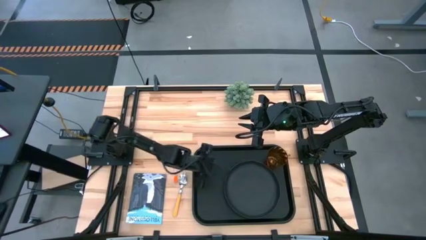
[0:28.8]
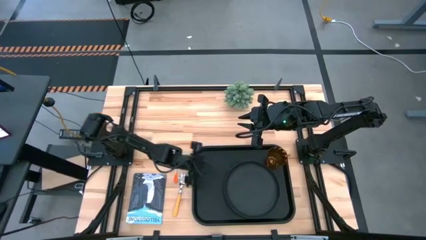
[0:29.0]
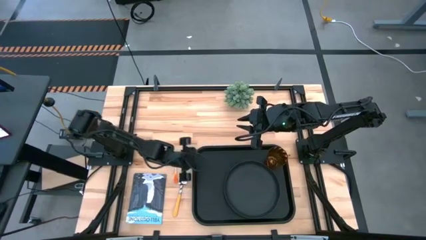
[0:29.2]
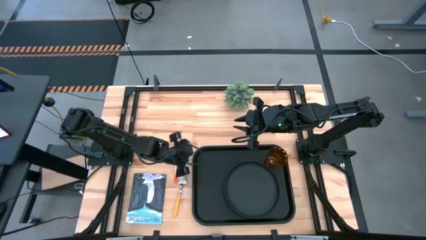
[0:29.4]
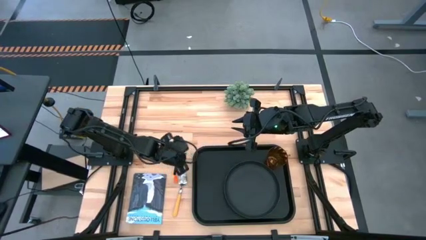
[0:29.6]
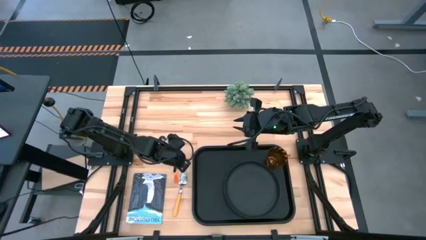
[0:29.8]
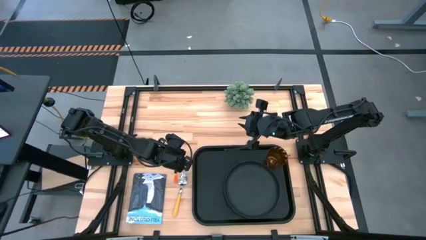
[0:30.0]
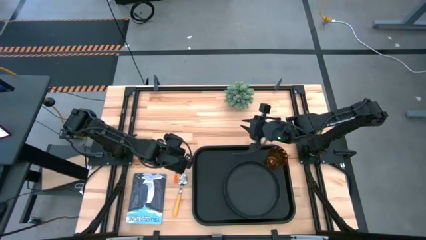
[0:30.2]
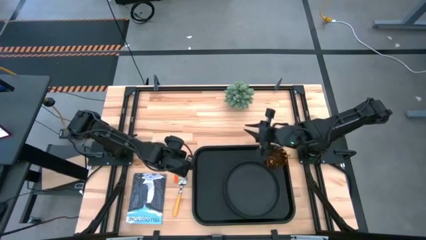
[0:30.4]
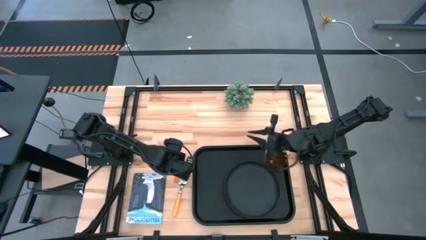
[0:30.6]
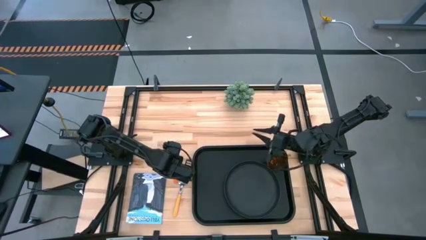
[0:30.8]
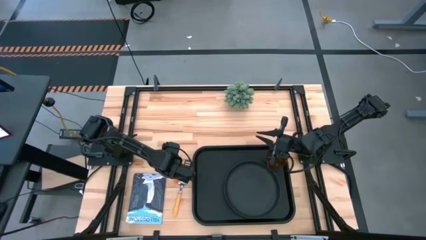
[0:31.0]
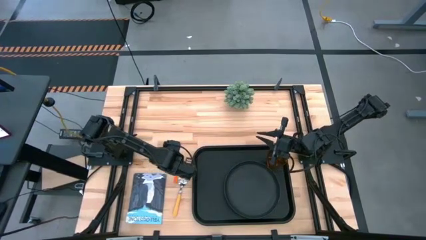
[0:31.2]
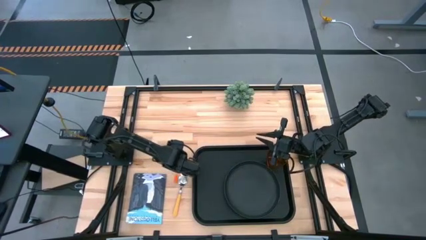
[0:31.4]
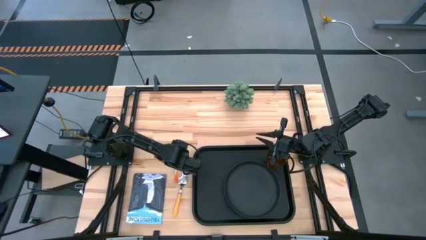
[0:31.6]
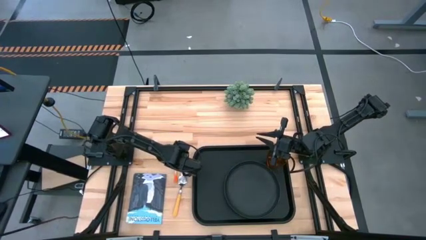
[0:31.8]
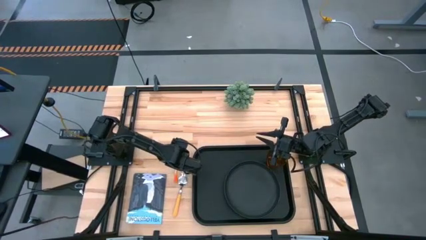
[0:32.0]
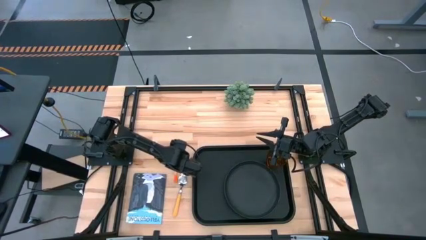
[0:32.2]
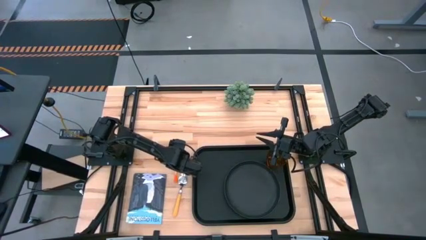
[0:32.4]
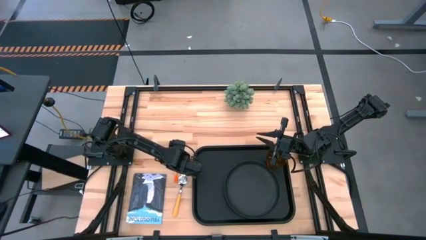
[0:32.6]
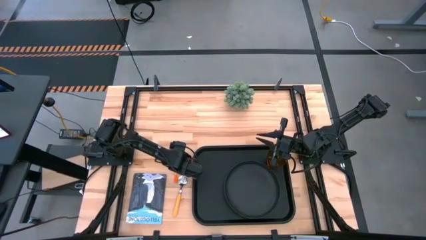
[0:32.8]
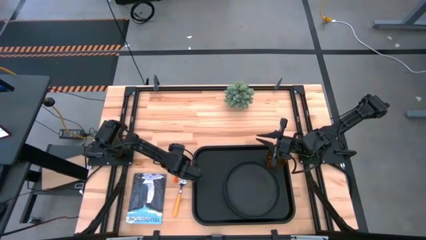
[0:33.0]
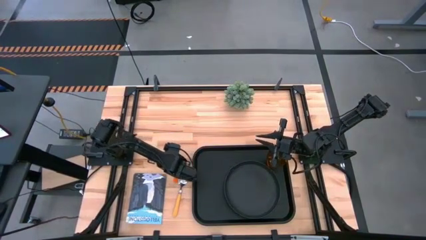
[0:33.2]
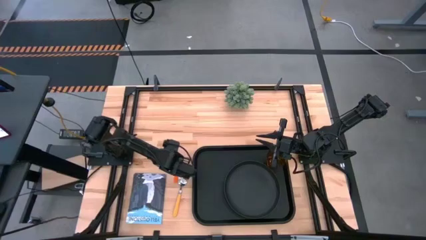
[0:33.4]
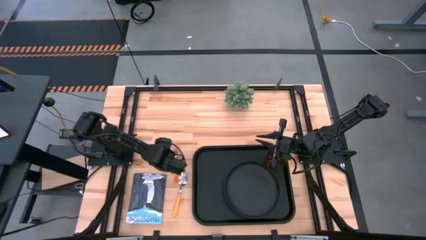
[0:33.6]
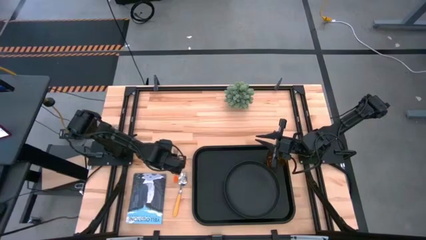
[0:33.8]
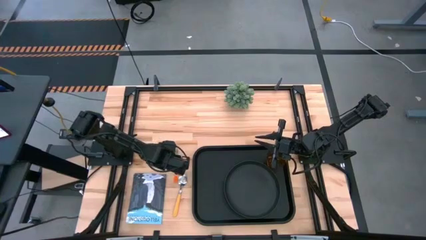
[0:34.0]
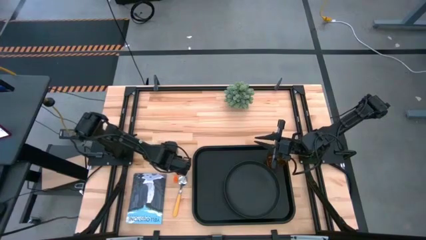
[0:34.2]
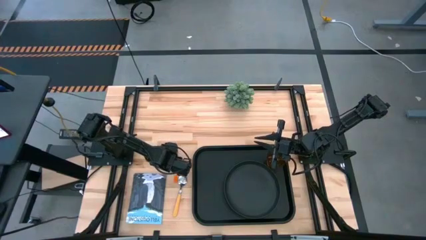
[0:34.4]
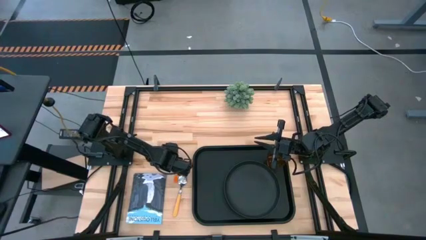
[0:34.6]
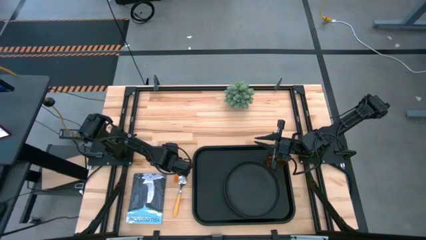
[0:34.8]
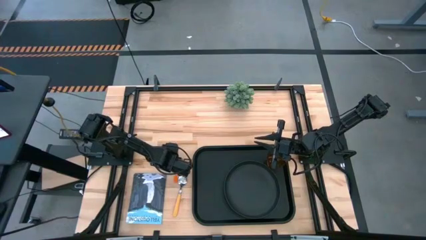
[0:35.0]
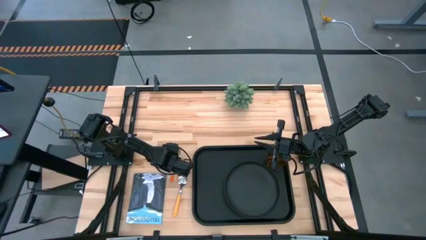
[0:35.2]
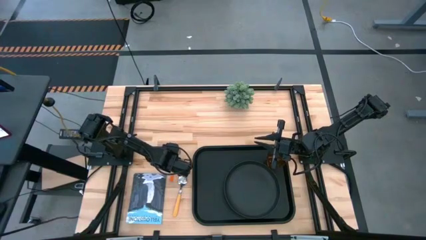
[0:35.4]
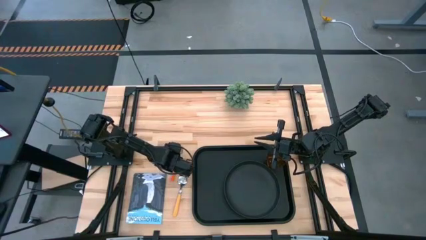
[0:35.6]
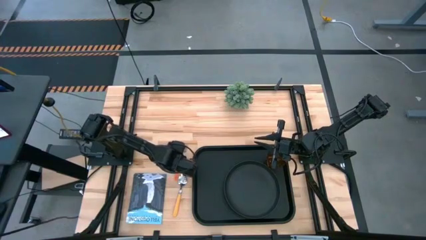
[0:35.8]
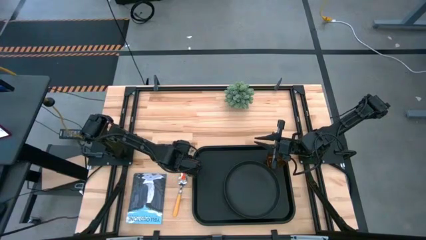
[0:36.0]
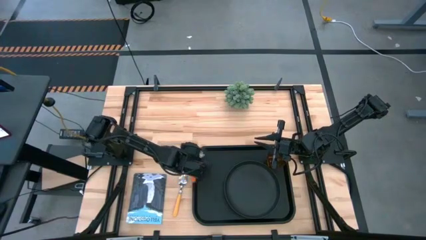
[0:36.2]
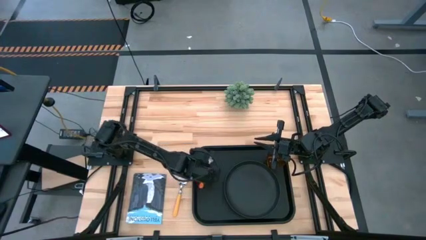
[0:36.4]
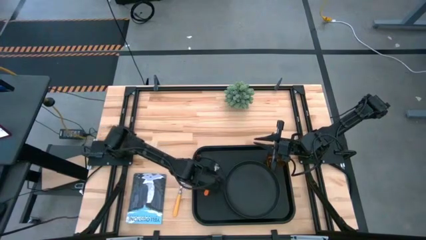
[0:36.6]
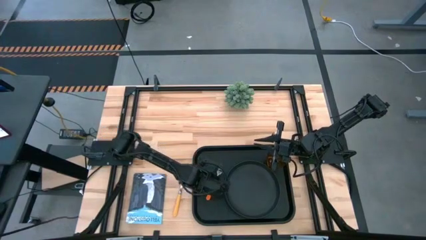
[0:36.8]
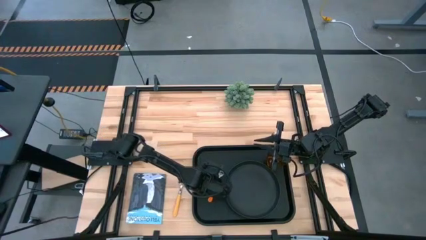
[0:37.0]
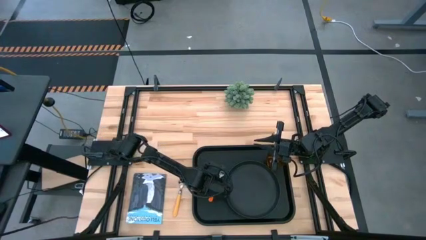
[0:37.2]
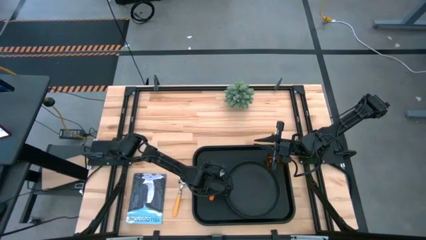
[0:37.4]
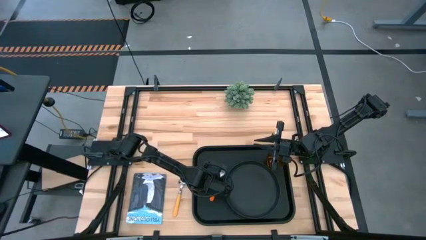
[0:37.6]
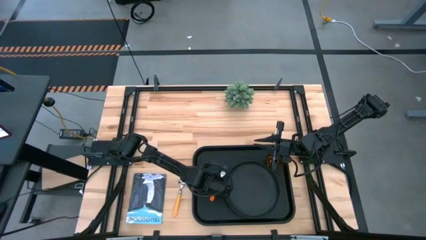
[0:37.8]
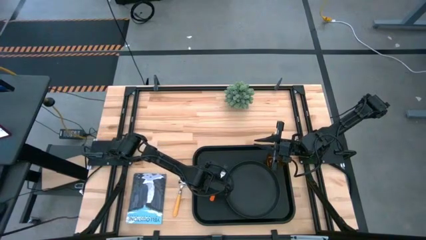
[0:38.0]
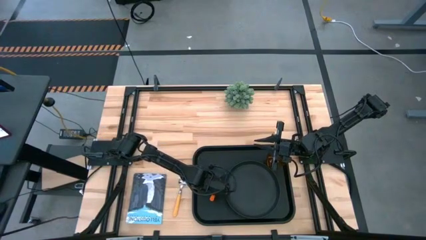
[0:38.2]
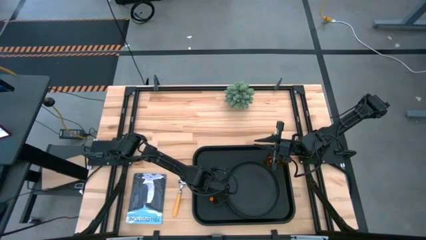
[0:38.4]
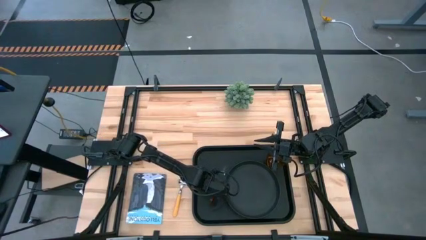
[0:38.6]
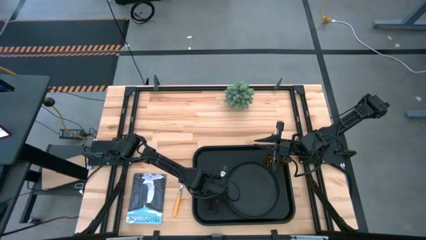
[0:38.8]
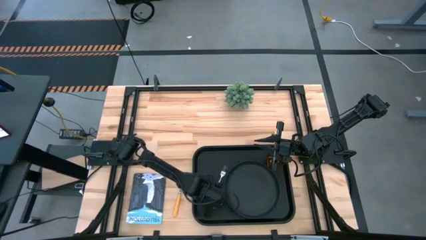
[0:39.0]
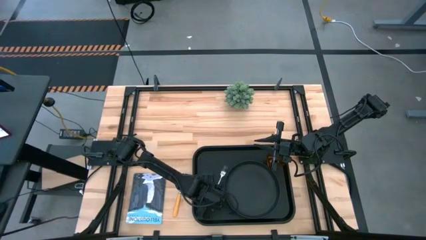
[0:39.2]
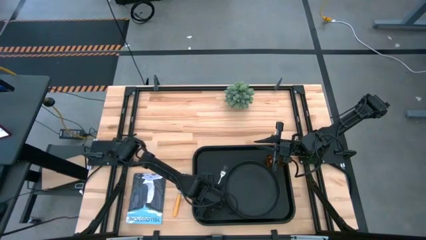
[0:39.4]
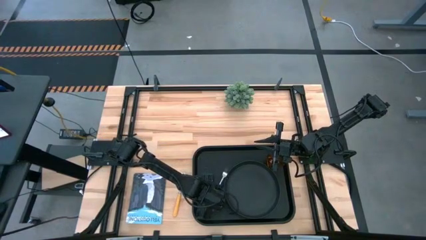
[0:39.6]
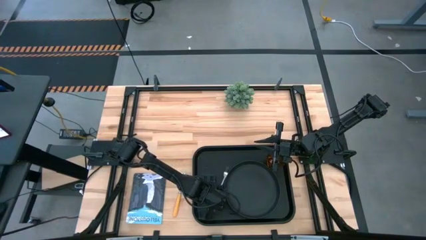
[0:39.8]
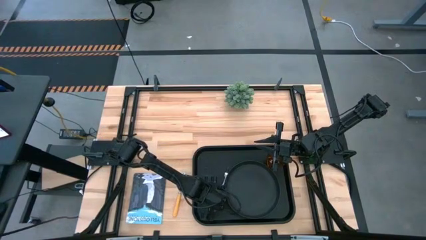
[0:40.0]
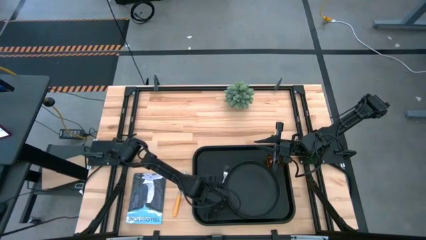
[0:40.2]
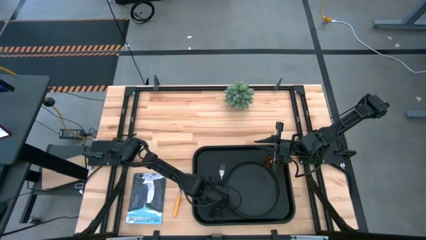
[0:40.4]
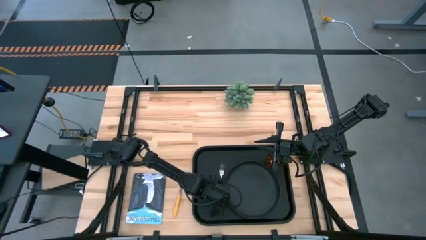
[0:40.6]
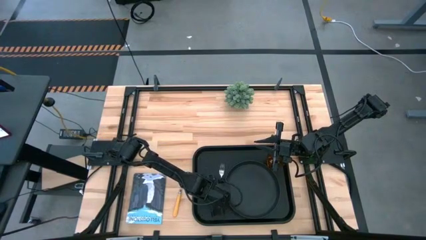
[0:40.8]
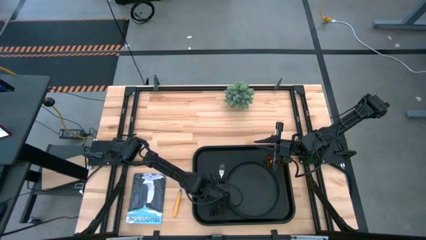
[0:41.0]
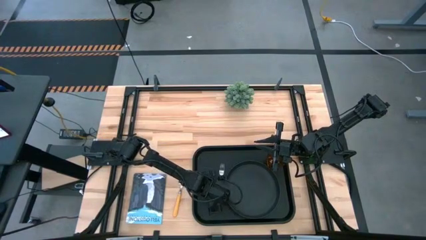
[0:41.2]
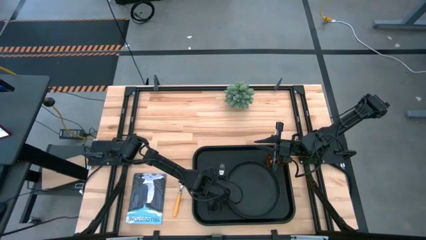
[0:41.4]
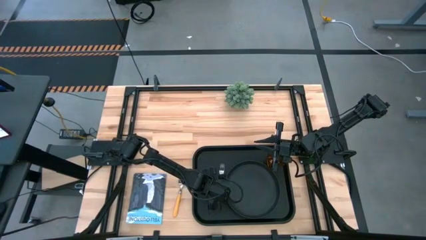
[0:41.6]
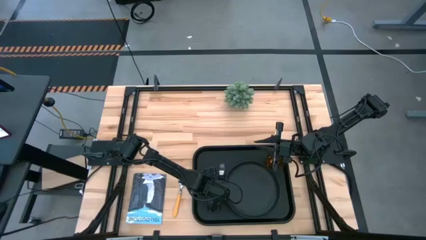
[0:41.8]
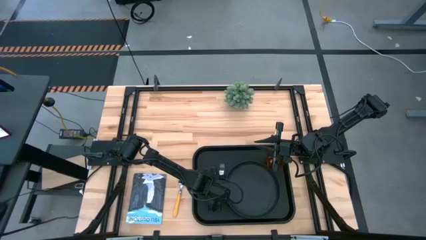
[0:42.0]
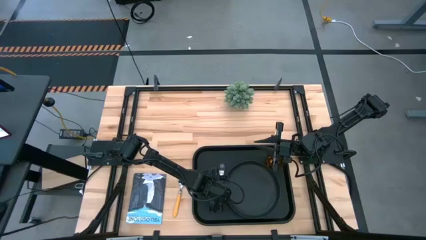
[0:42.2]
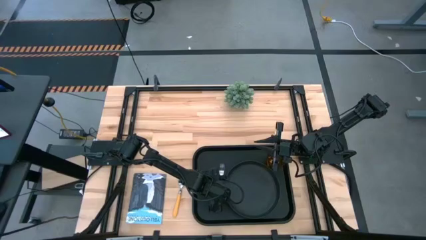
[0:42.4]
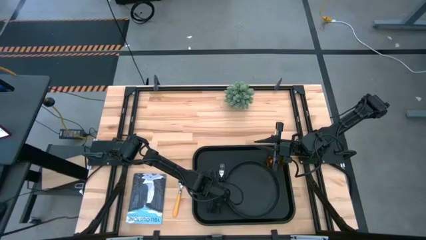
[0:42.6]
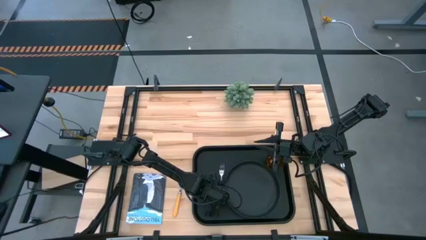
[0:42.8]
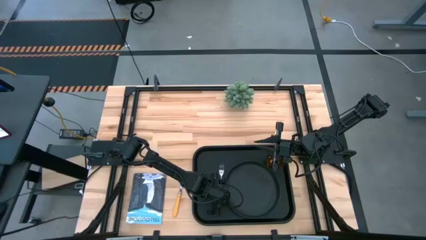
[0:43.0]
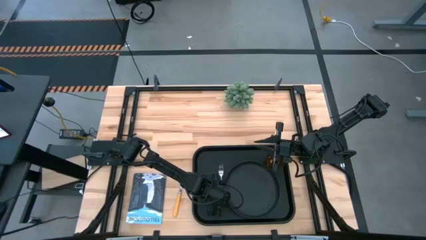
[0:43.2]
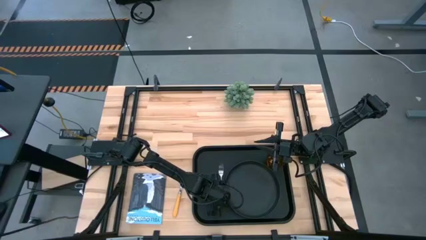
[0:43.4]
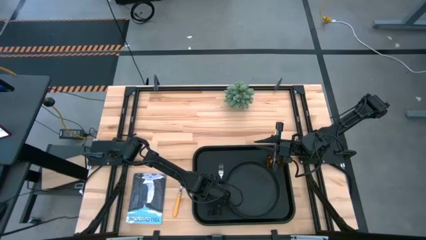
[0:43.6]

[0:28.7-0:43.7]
Task: Pick and place plate/cup/fork/spoon on tray
Put the orange fork on the black tray to the left of the black plate

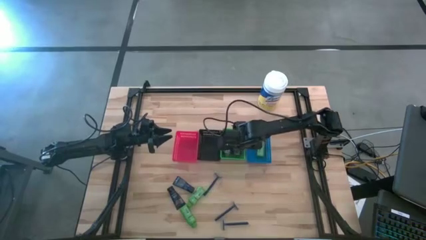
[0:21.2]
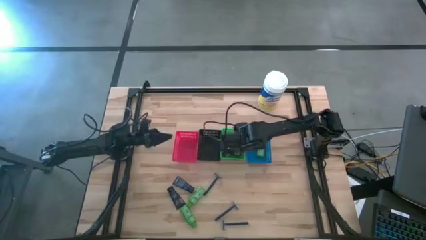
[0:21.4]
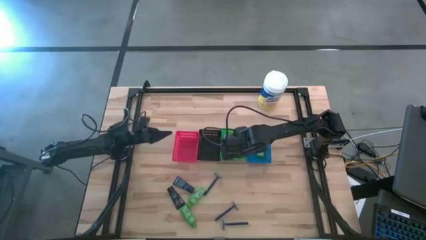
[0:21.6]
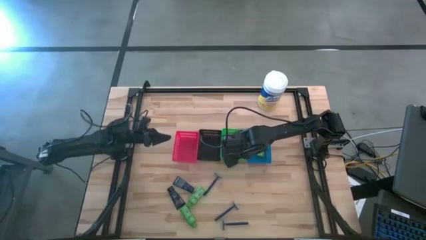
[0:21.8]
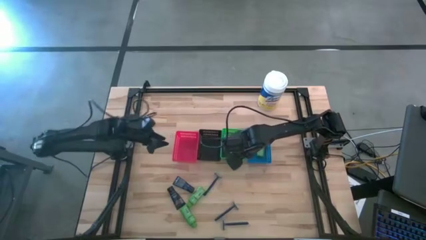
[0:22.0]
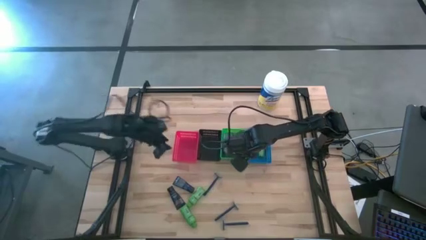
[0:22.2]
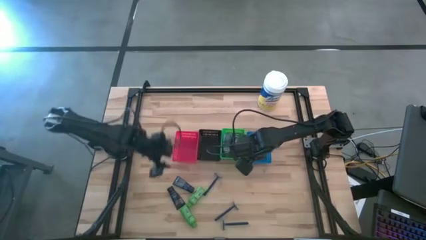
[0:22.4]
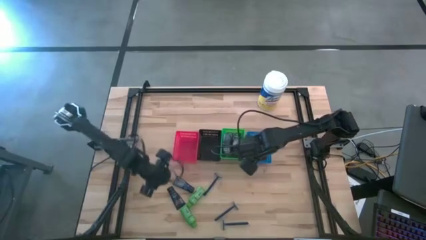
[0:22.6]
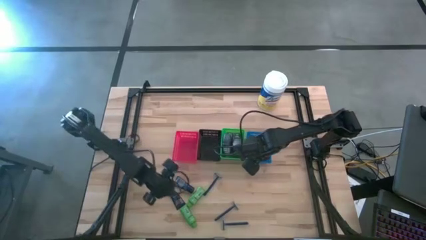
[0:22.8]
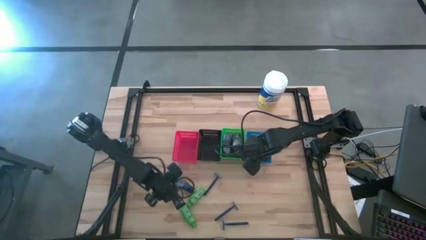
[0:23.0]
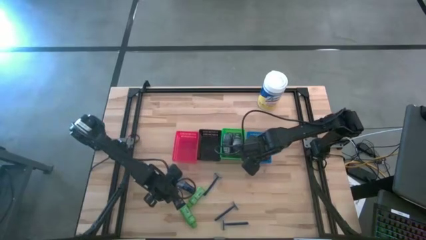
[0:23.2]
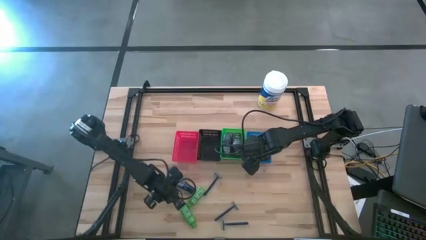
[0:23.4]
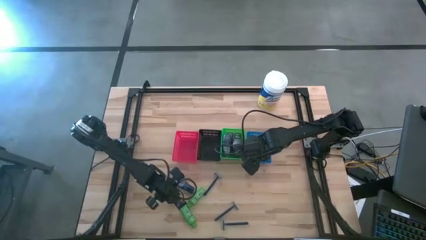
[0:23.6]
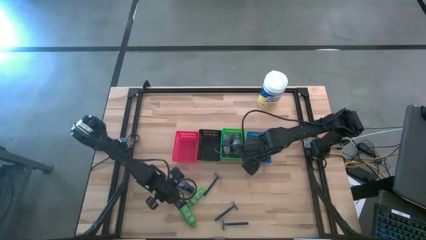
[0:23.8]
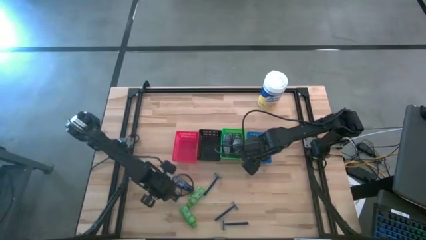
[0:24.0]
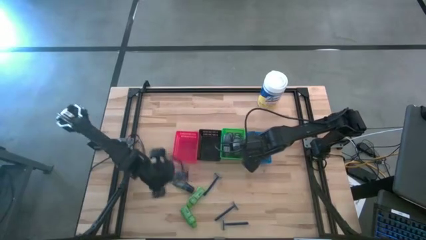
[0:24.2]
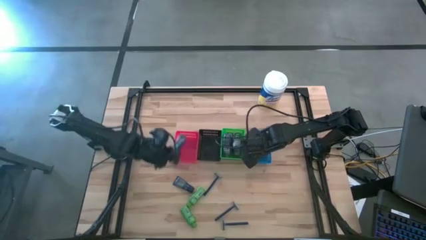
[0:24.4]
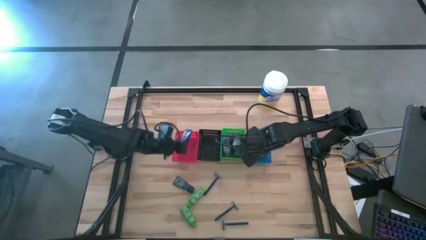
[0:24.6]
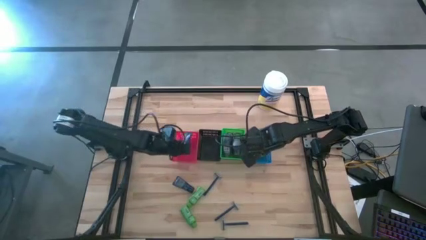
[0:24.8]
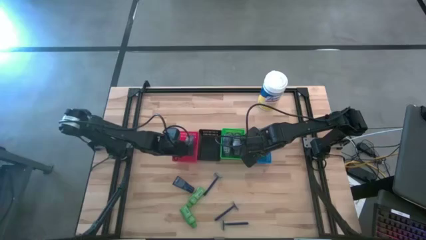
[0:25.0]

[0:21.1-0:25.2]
Task: Pick & Place Travel size toiletries
Put the blue shave cream into the red basket
